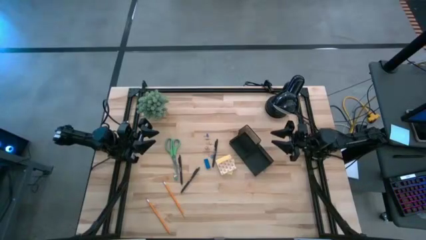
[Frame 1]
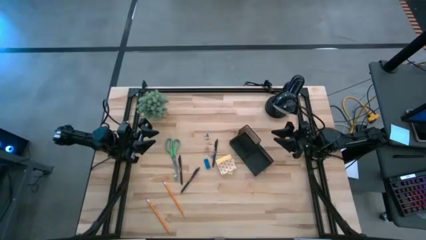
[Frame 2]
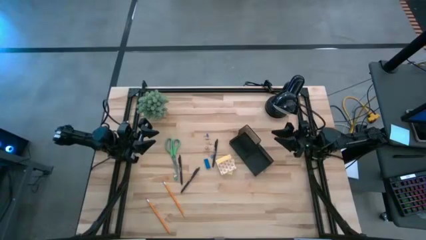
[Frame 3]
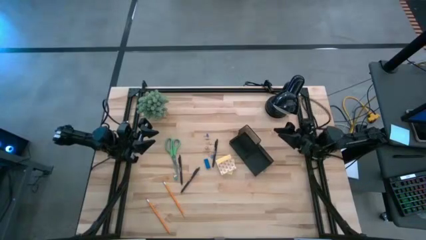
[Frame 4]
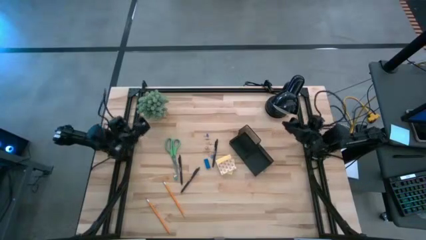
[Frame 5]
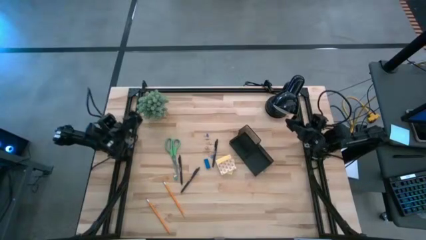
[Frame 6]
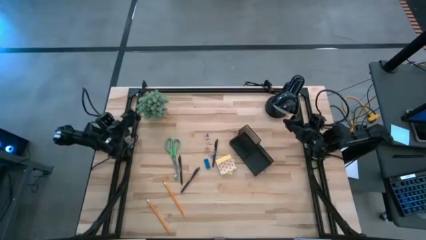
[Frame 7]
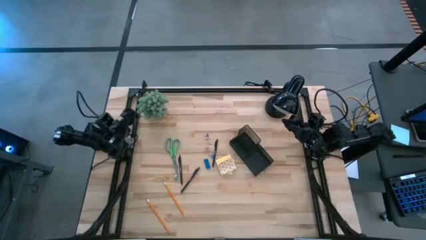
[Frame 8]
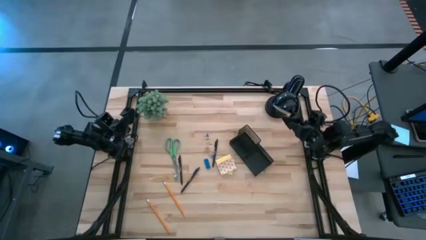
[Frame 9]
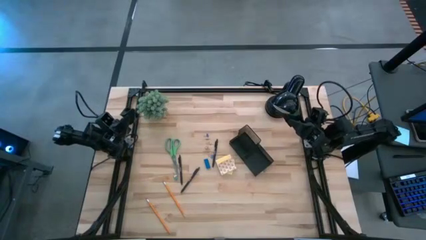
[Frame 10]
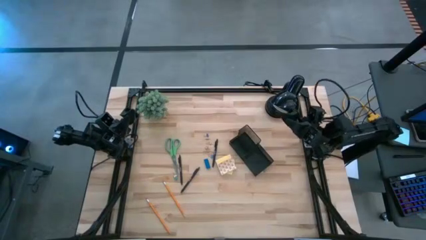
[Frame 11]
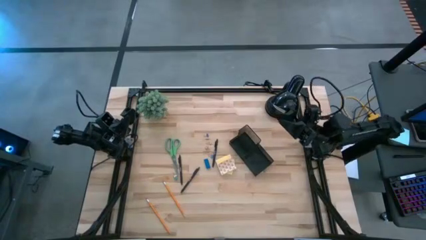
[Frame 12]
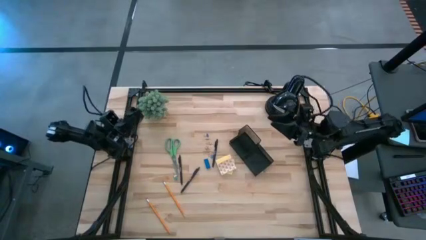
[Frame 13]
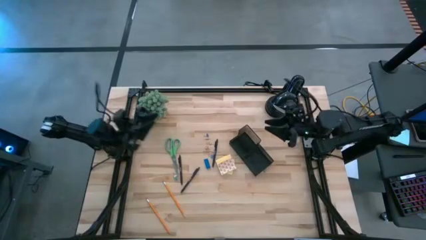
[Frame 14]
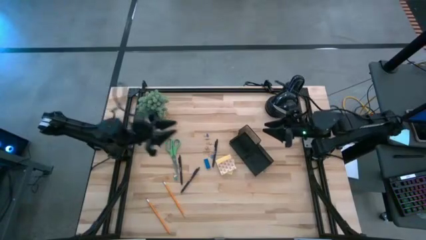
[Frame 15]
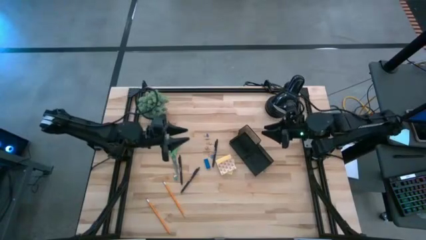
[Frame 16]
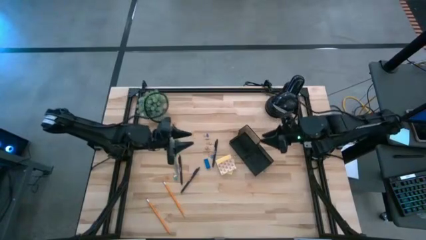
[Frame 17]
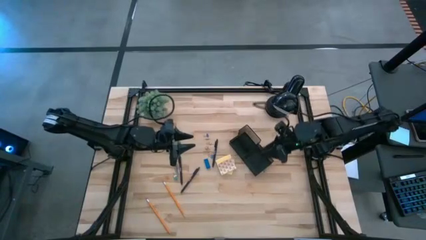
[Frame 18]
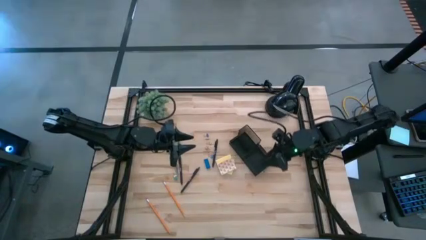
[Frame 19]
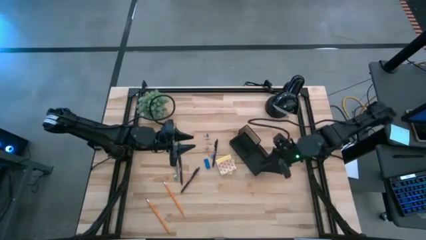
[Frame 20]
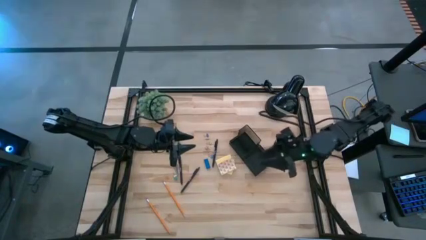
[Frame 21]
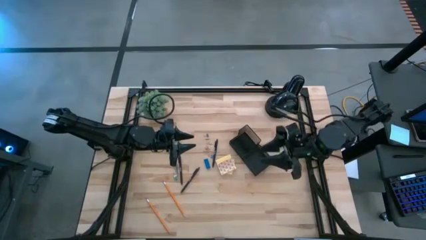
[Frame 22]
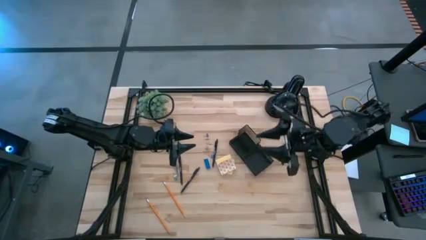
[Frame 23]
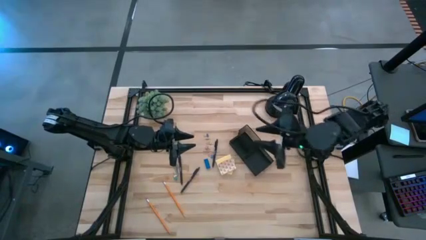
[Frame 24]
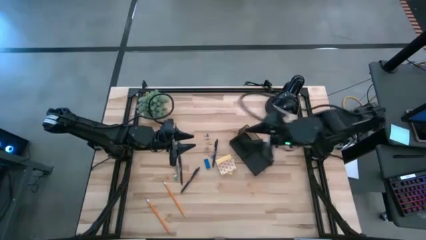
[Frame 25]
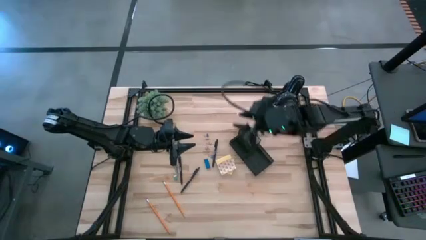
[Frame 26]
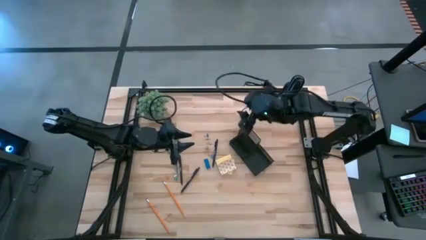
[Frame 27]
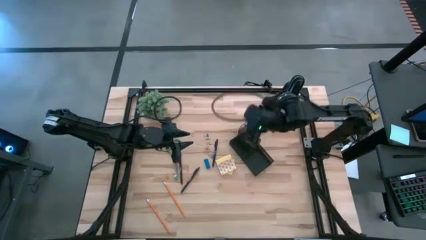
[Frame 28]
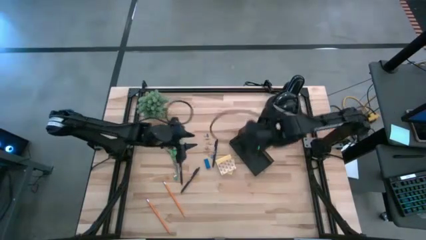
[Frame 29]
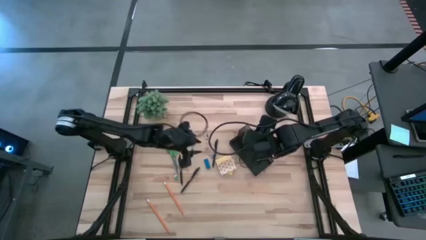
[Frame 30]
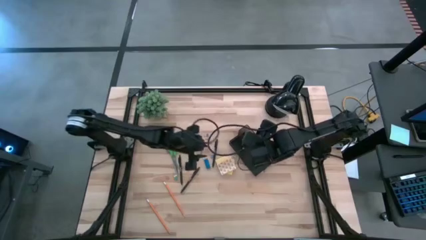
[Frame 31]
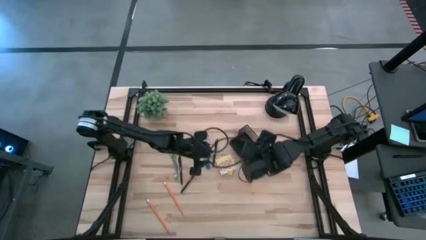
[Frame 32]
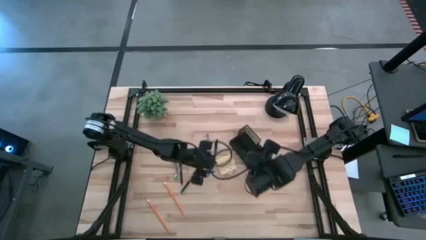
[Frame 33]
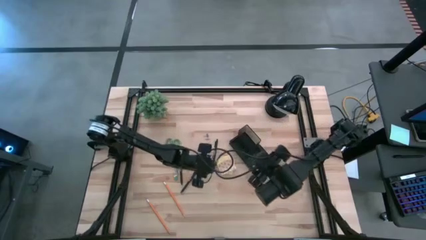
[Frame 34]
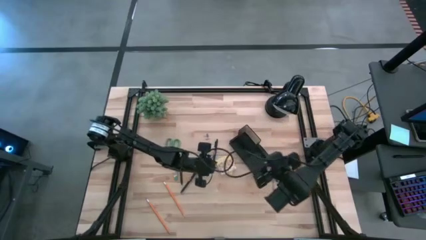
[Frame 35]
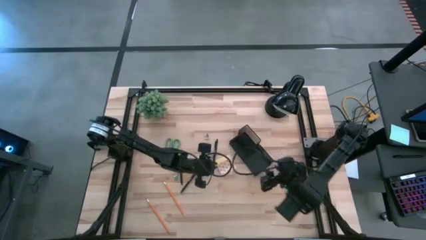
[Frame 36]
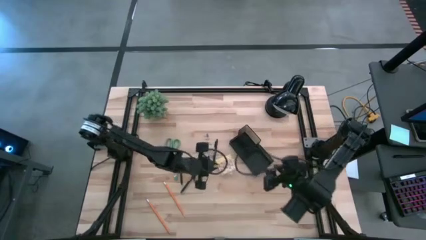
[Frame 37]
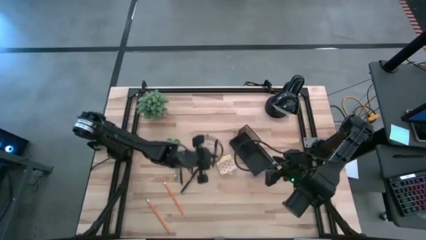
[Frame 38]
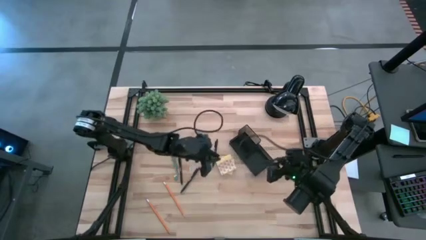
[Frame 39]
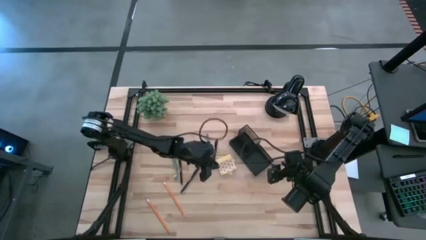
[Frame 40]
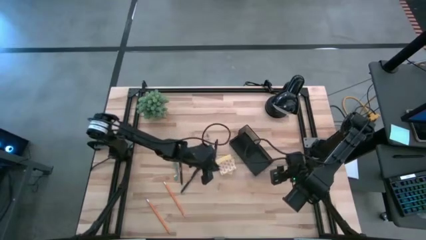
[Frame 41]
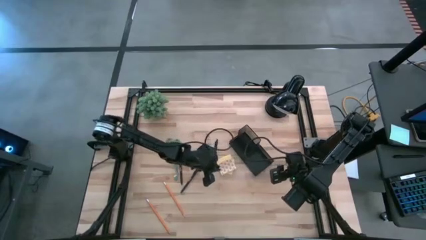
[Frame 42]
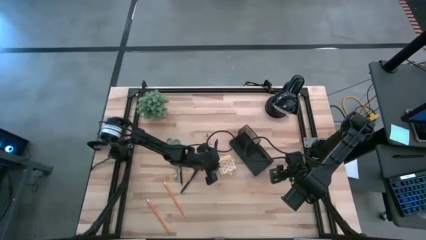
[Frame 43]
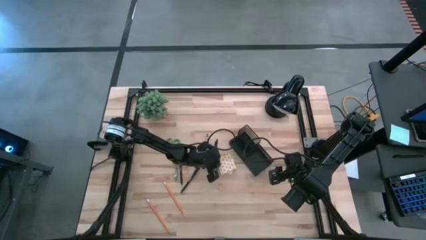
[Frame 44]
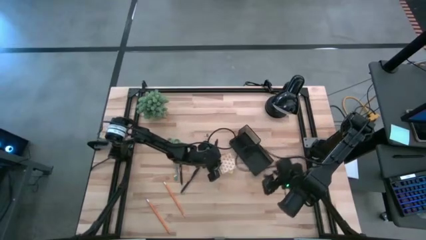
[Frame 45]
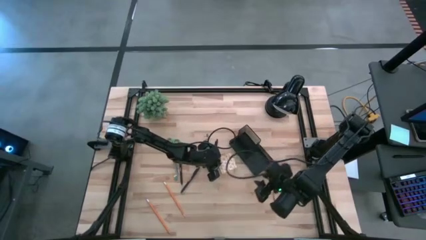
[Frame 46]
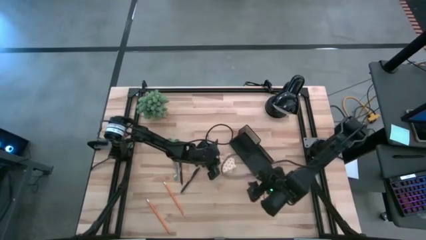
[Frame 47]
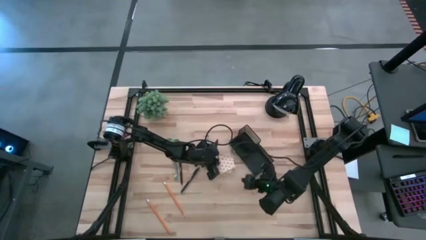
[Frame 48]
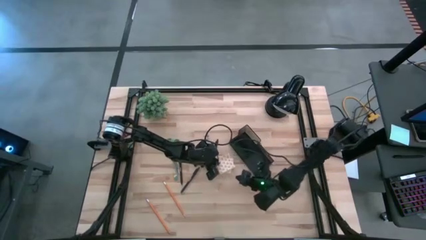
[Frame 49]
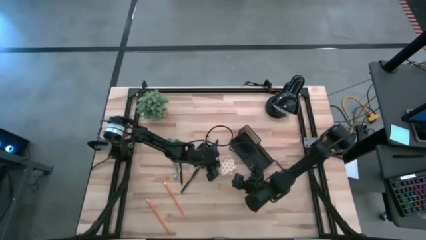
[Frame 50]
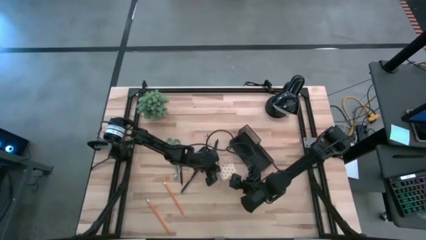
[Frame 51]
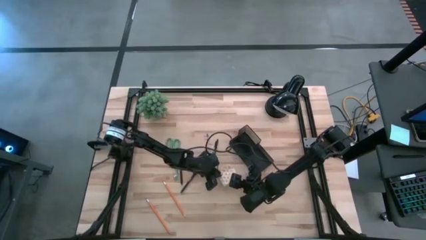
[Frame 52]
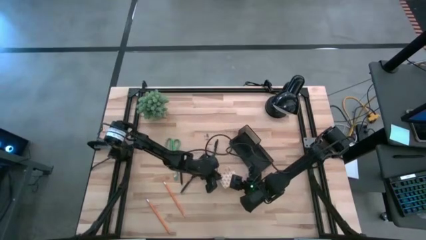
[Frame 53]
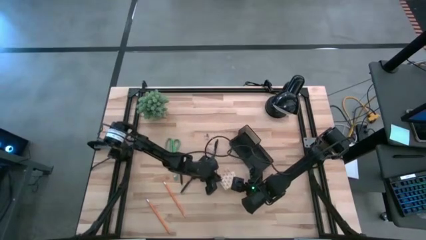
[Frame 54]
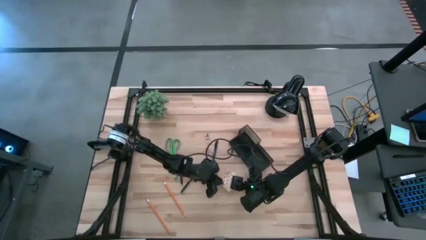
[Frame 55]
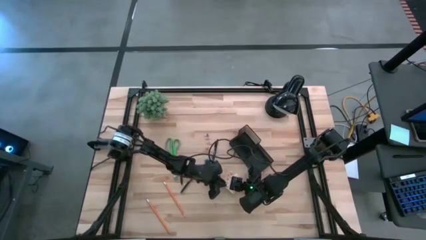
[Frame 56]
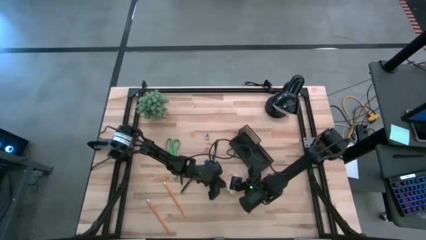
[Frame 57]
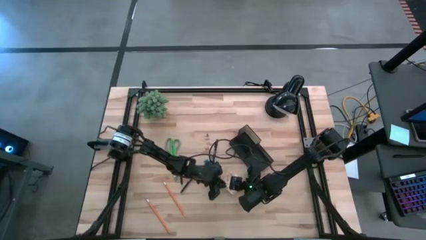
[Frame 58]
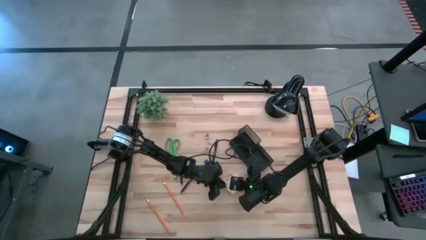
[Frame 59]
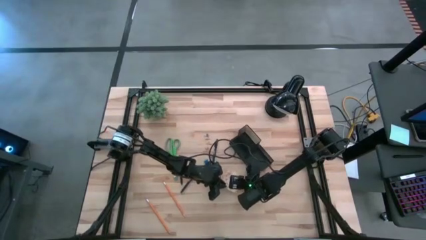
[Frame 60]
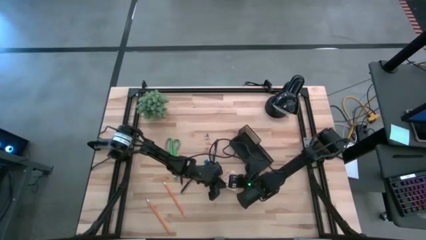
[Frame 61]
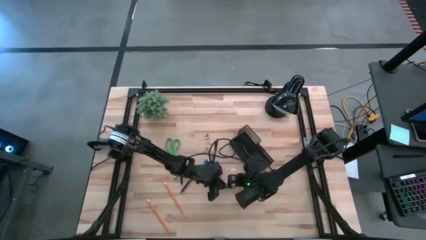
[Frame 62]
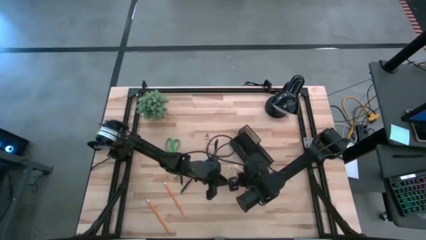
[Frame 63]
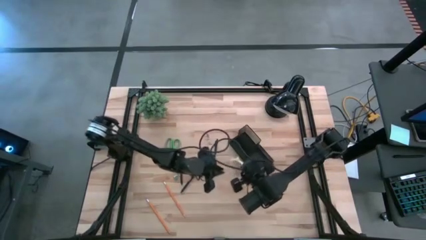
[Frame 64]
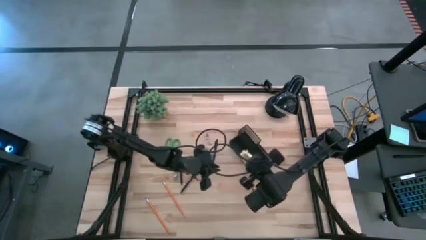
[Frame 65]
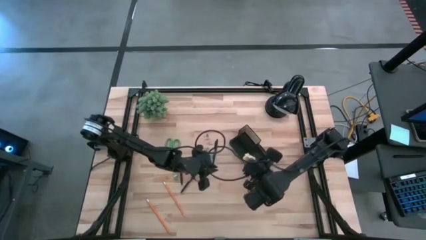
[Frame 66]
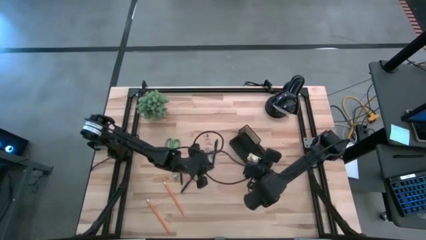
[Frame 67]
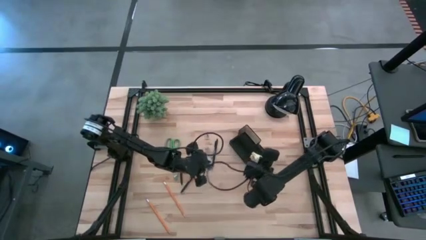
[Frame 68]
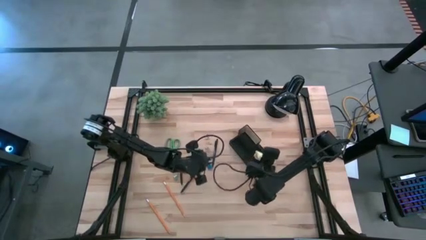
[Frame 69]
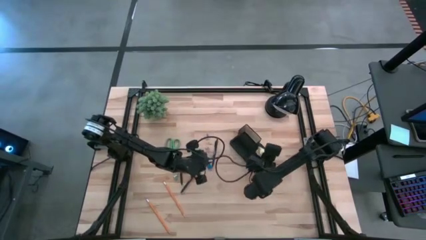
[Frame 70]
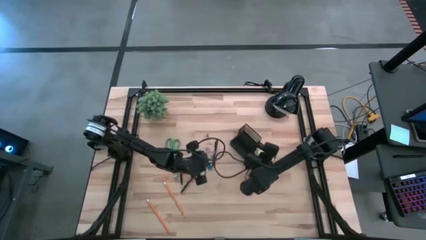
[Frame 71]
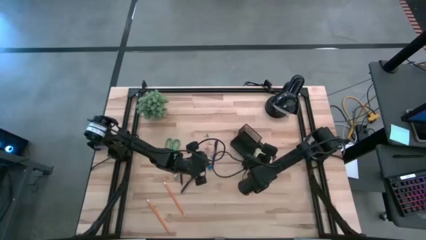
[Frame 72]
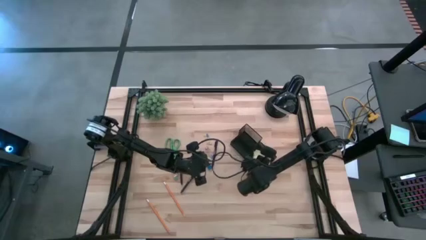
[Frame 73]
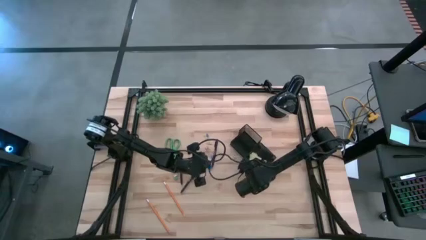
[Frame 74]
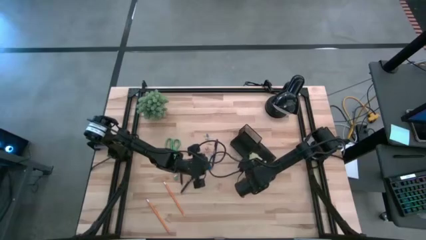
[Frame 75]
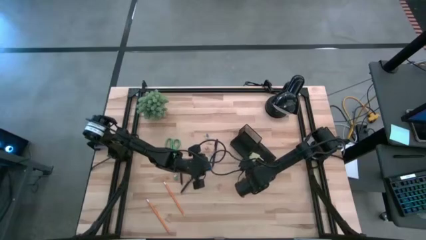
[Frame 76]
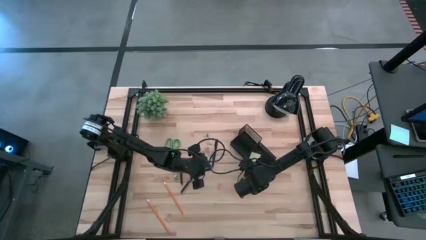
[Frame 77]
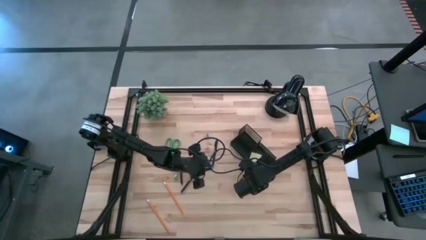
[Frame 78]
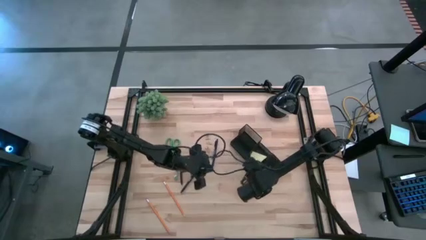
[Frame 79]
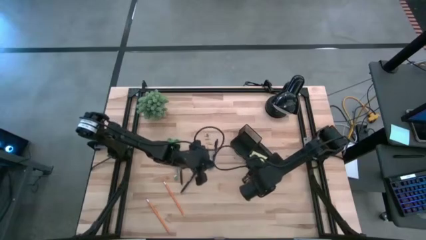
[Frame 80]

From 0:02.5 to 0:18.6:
Task: Pick and place office supplies into organizer
Put the yellow sticky note into the black mesh organizer
